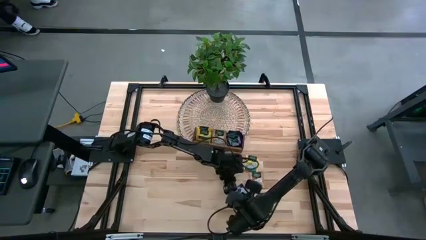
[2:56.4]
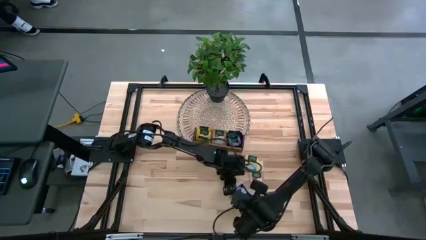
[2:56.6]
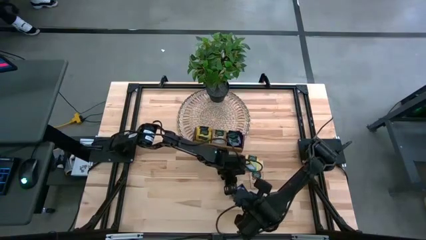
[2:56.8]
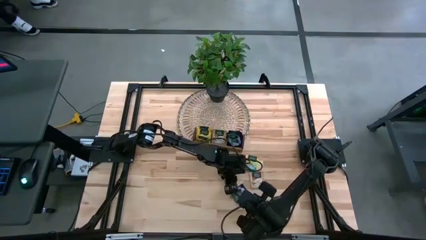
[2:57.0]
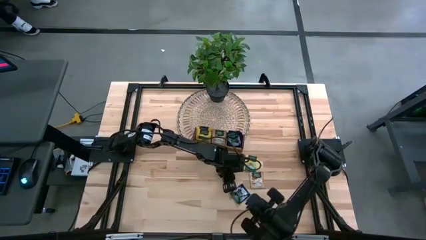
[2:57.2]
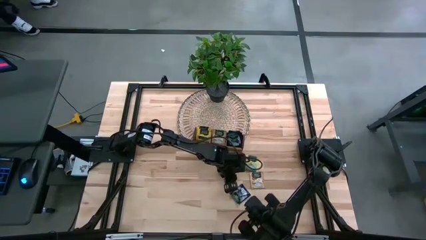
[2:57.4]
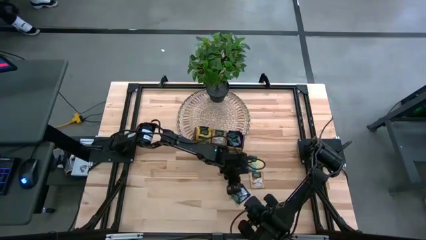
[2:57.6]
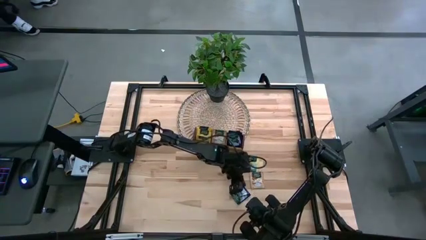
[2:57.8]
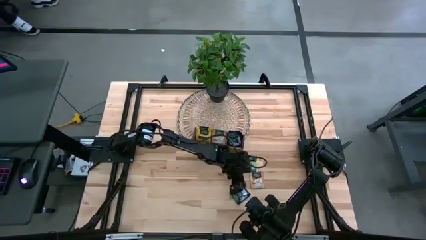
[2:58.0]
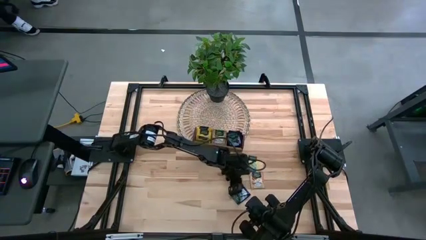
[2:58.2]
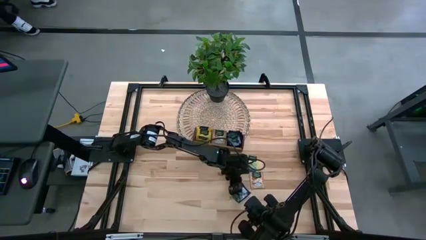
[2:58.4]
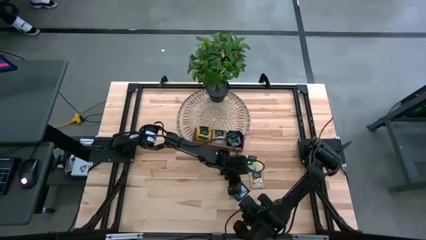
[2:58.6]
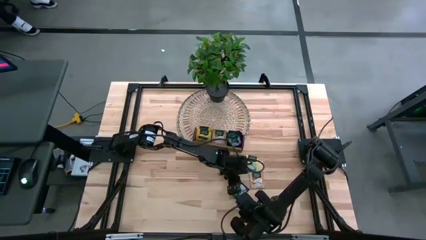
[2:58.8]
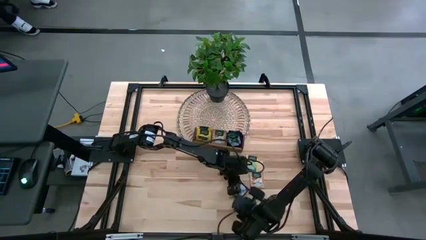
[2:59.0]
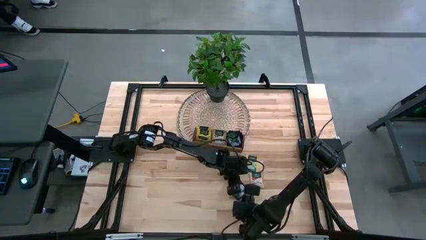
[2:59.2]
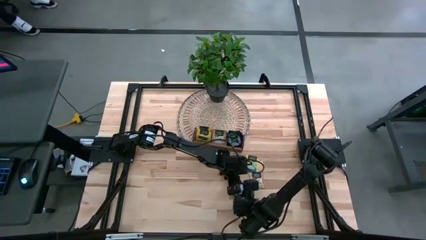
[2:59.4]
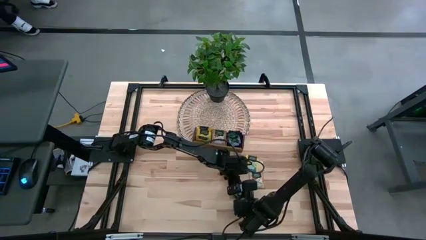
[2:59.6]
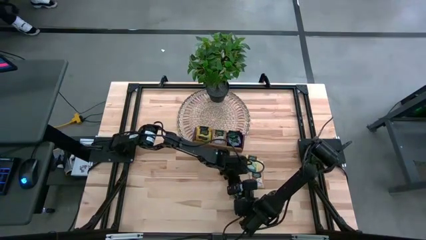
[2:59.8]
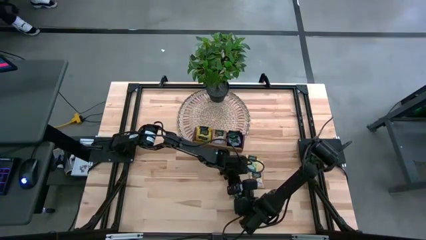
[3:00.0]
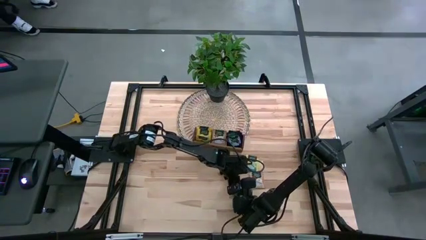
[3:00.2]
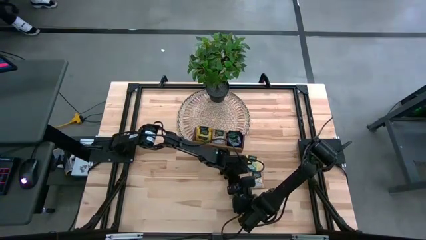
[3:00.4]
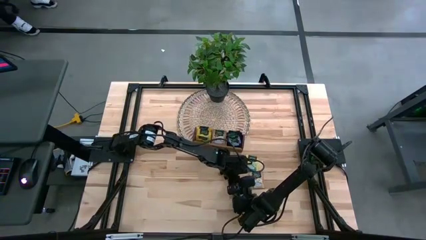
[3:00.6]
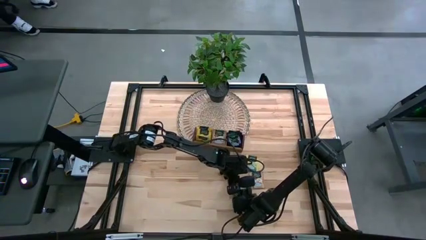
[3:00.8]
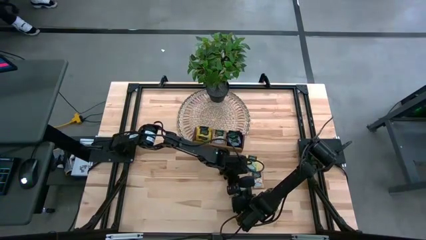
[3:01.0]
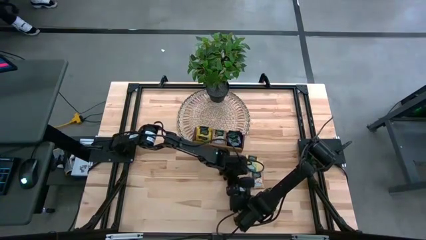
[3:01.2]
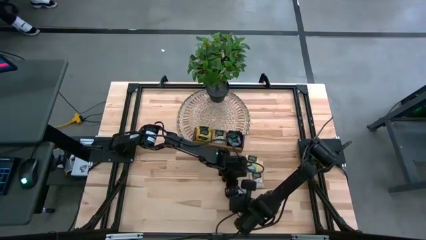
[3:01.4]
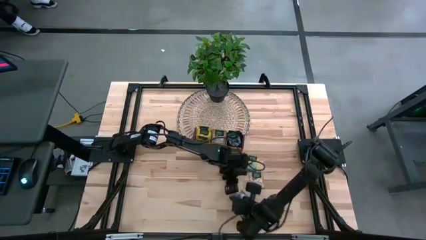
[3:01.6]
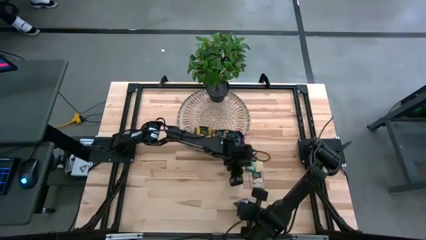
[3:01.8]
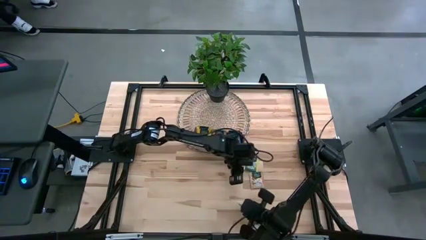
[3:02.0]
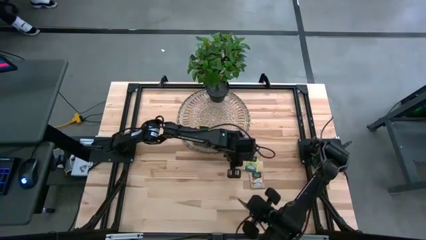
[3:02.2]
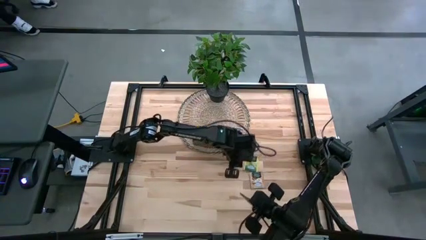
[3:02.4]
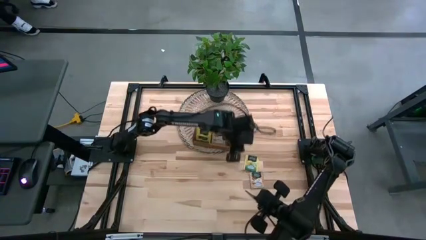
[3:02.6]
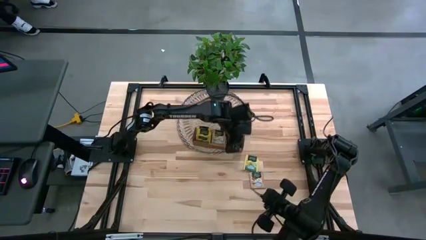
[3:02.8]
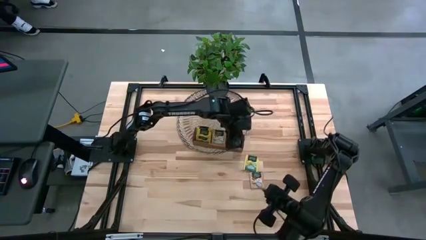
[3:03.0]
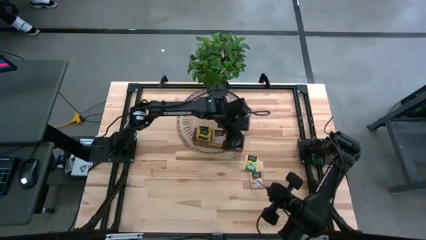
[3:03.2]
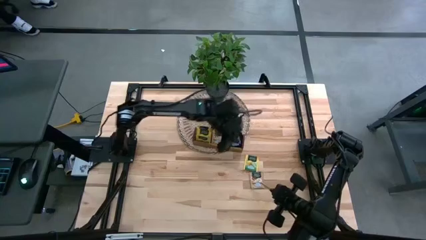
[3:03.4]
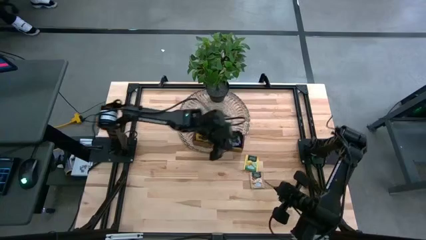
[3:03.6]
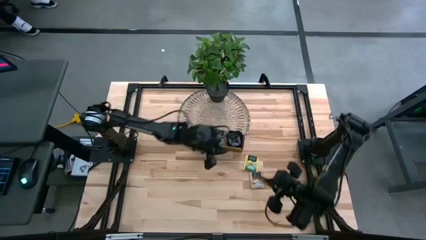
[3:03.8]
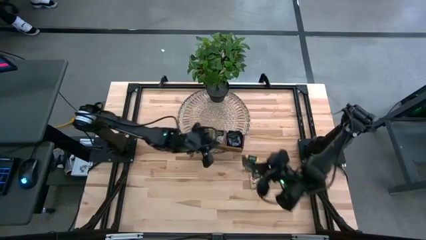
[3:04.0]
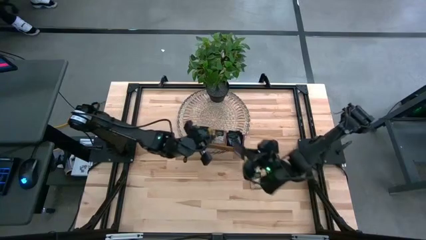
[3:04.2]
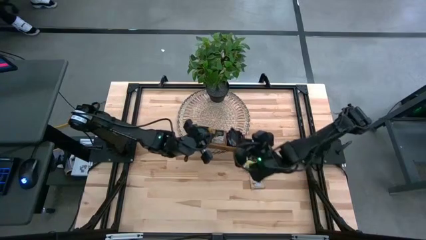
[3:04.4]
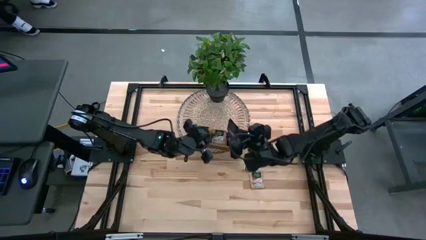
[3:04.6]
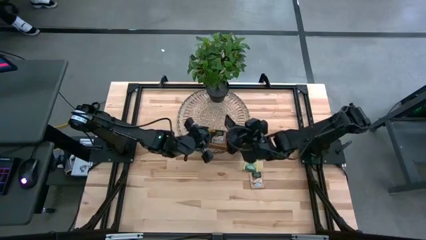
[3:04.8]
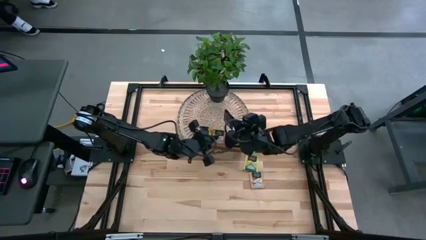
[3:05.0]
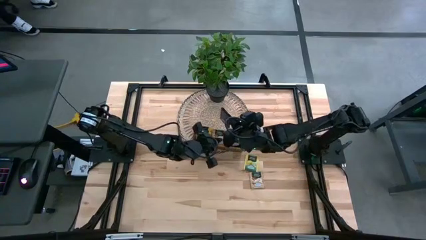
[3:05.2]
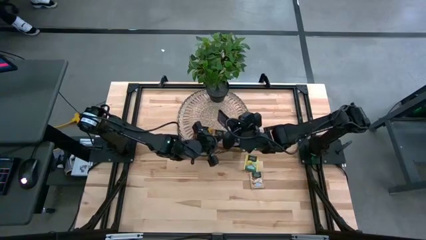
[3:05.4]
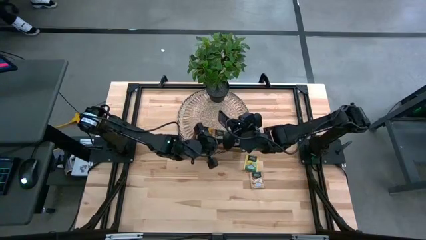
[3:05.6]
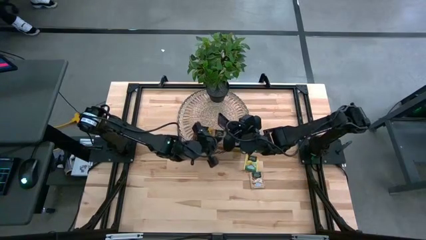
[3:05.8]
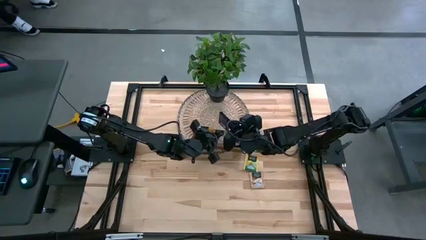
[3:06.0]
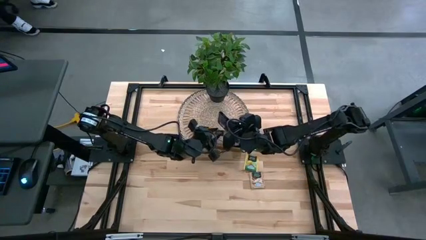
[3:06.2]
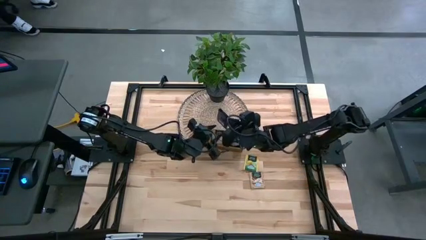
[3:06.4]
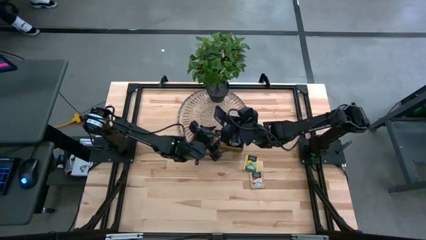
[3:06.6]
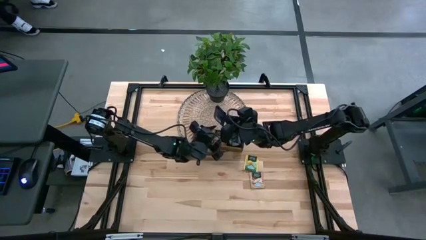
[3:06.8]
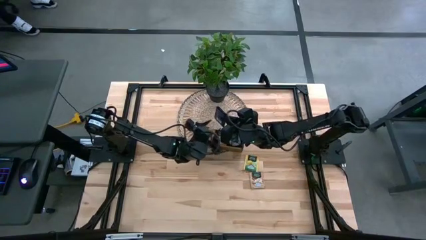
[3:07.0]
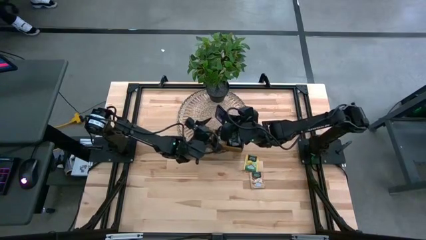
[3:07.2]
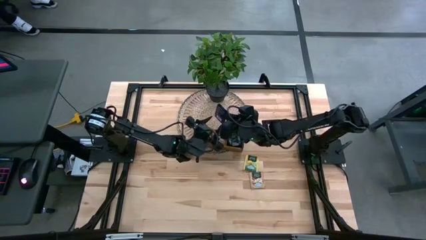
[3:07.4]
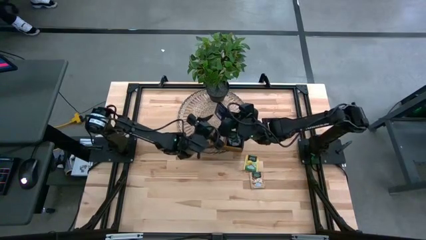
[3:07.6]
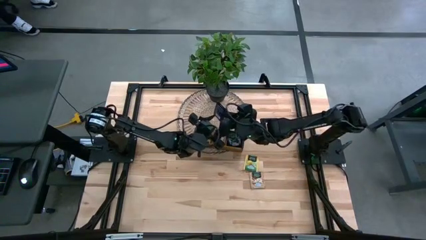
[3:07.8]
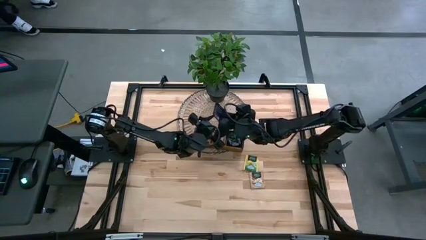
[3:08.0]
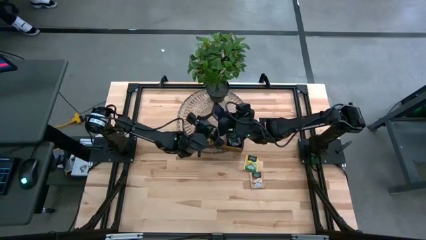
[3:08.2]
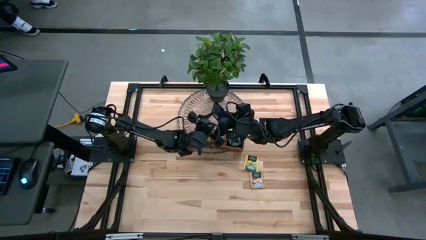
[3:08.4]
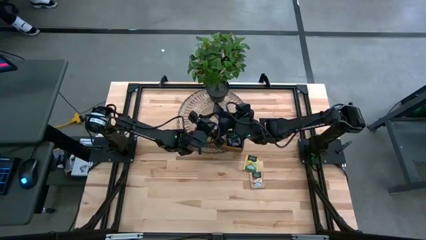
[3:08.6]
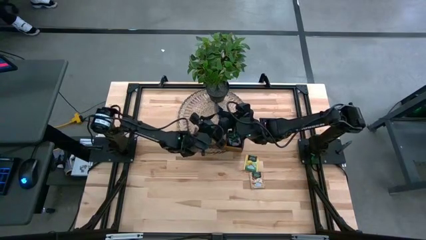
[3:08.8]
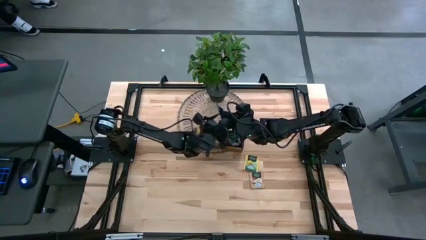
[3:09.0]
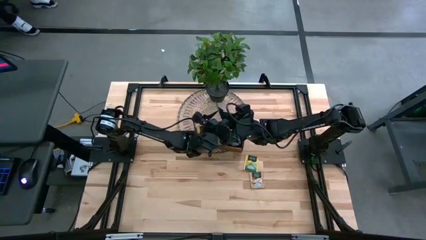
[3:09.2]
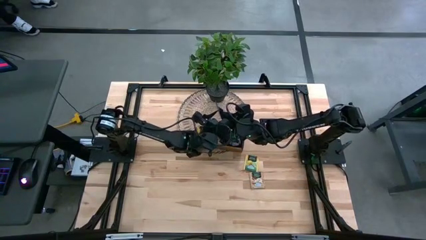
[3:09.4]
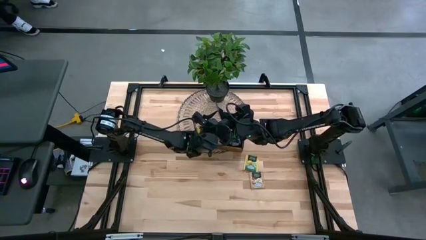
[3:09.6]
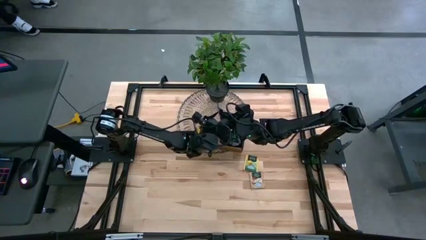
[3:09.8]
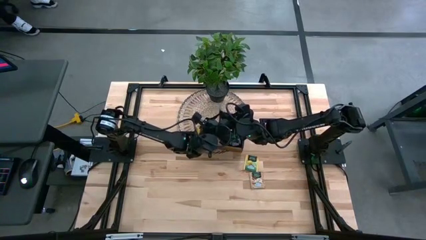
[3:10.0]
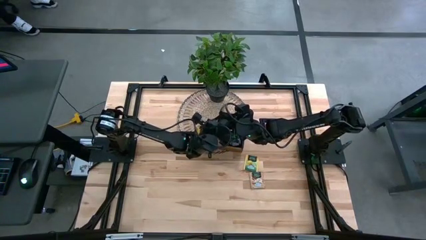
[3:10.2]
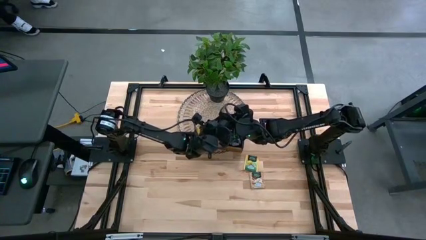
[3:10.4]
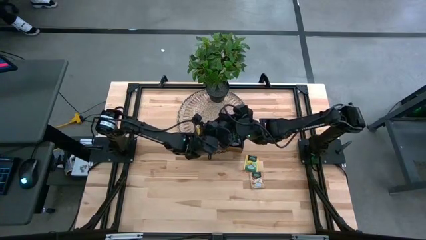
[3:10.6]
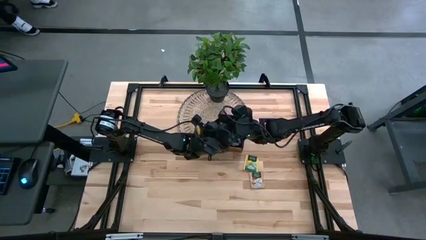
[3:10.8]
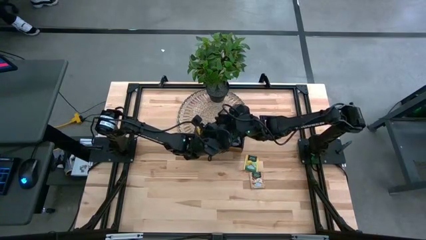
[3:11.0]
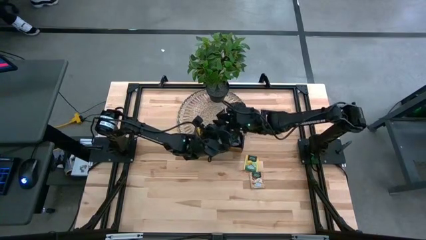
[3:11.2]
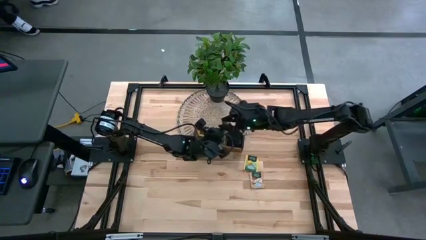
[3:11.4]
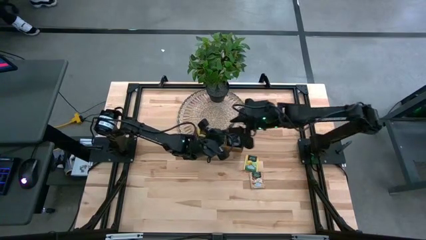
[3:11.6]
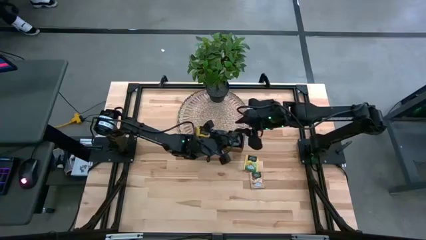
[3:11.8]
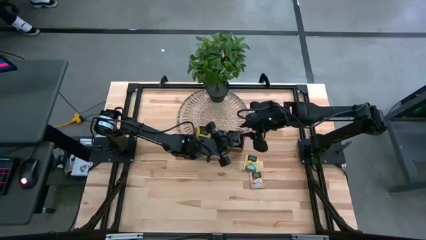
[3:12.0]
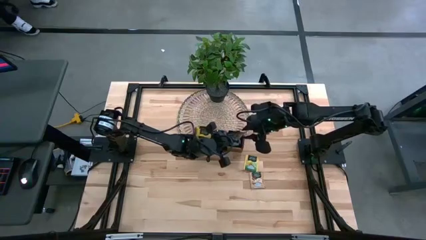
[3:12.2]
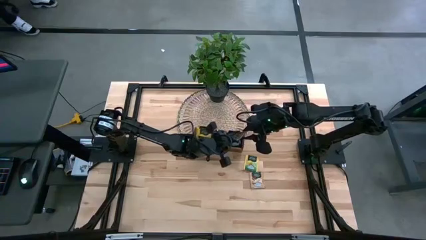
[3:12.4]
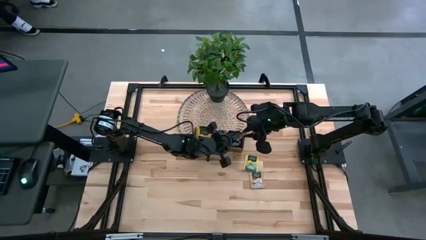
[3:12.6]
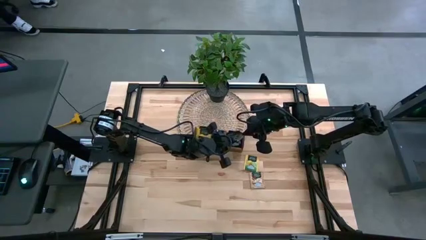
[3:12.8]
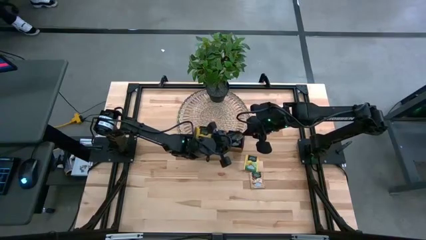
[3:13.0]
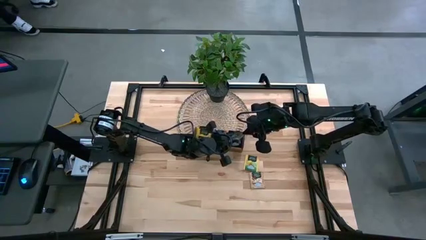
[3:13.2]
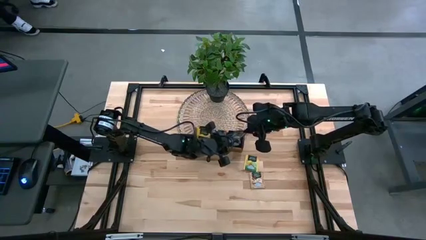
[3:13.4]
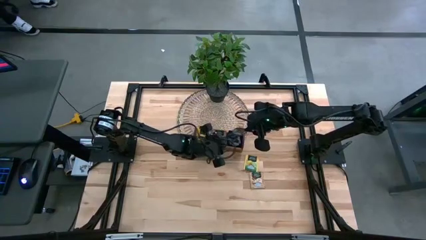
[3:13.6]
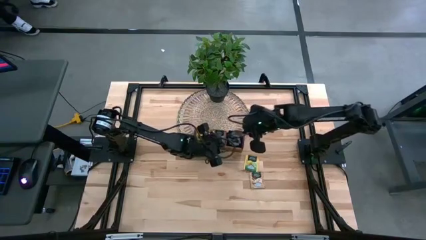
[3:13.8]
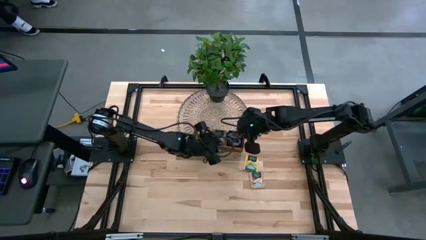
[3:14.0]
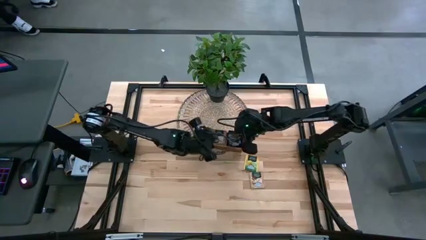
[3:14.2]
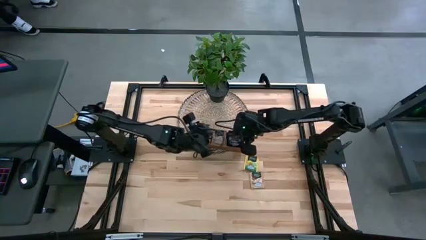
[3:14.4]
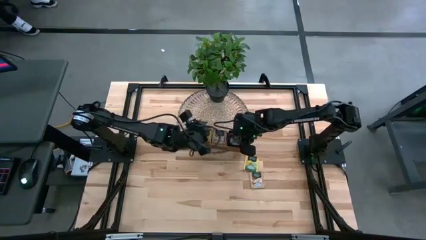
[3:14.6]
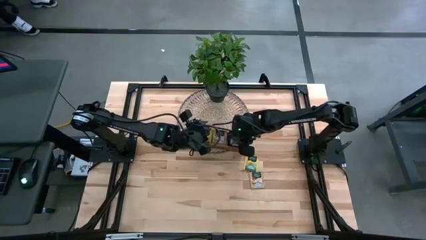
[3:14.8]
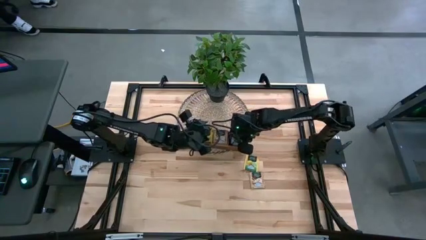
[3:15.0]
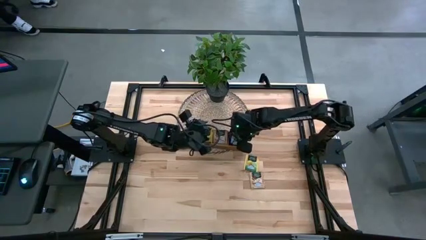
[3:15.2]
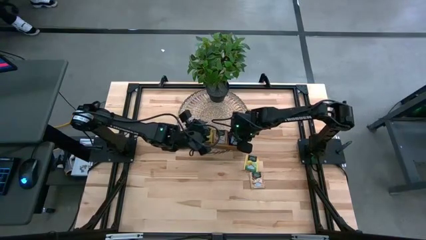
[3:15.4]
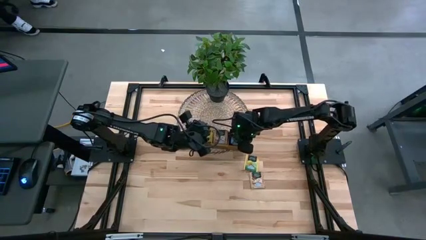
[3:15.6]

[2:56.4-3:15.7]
Task: Pick & Place Tea
Put the violet tea bag into the right section of the wooden organizer
